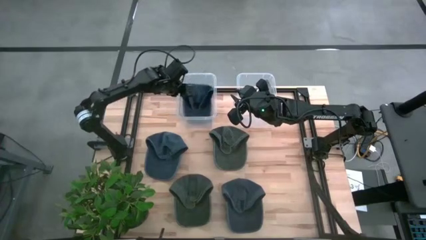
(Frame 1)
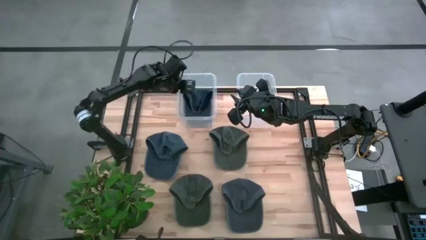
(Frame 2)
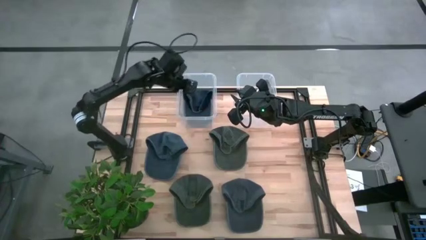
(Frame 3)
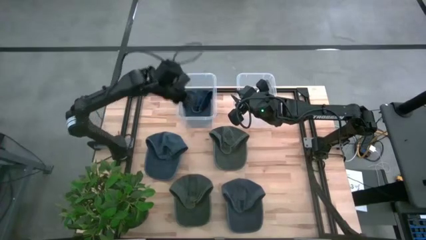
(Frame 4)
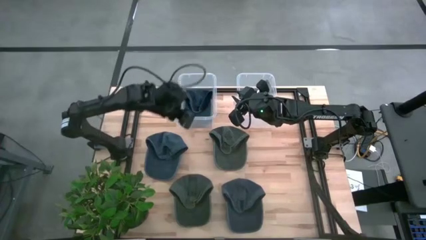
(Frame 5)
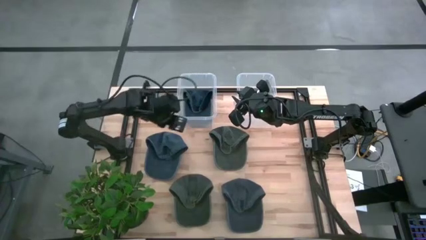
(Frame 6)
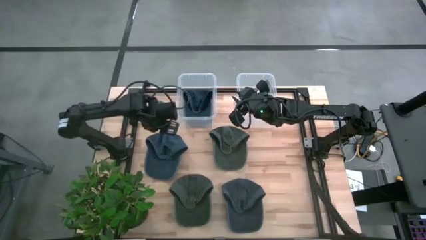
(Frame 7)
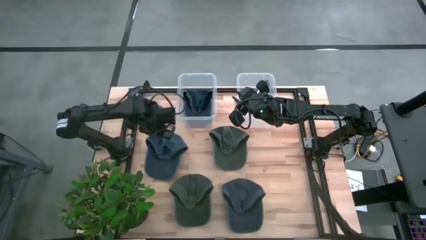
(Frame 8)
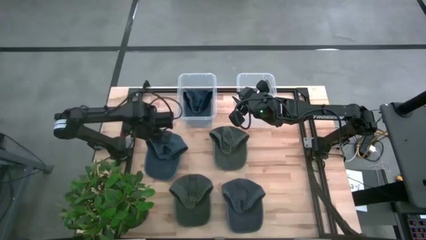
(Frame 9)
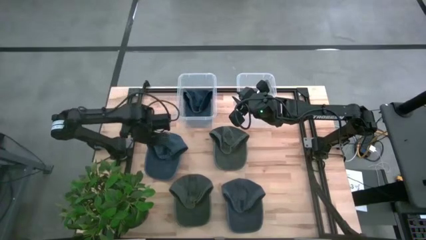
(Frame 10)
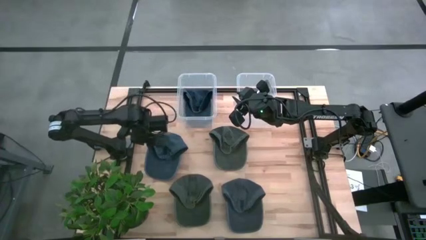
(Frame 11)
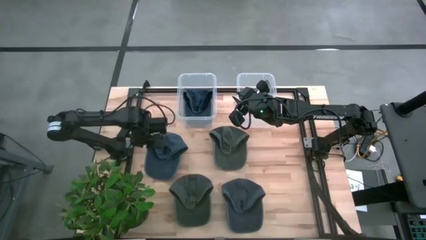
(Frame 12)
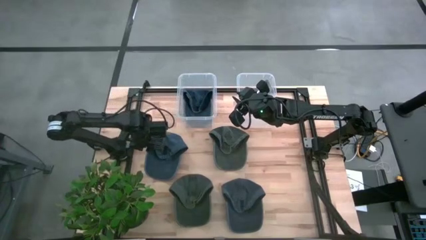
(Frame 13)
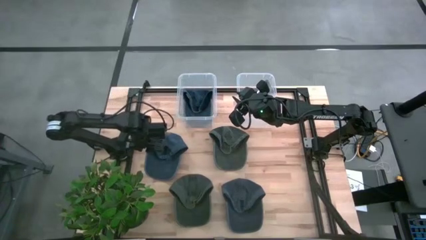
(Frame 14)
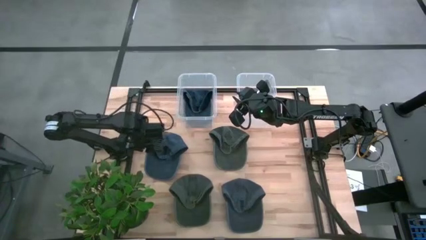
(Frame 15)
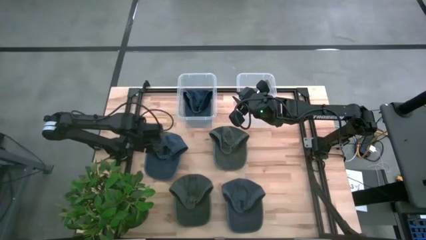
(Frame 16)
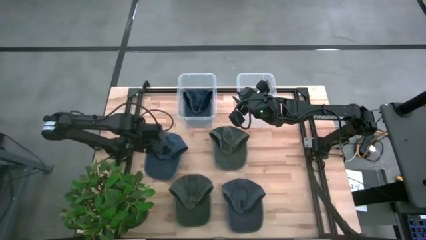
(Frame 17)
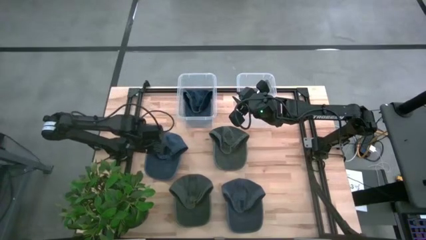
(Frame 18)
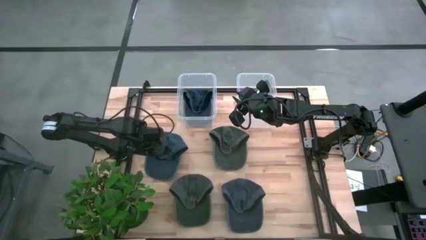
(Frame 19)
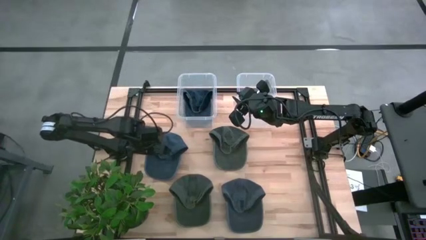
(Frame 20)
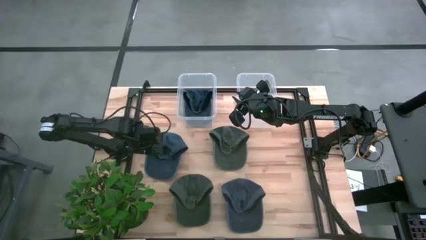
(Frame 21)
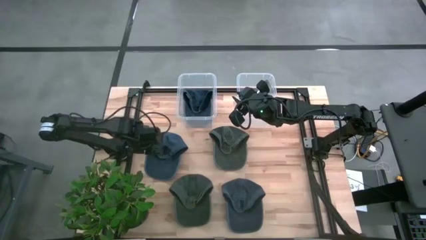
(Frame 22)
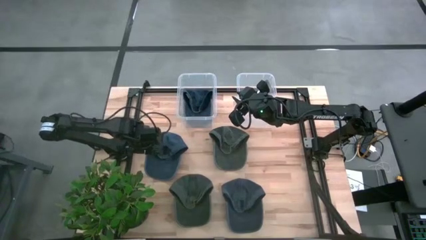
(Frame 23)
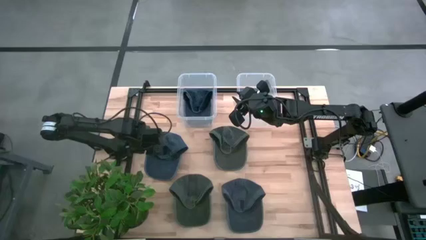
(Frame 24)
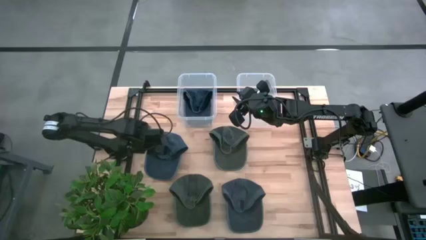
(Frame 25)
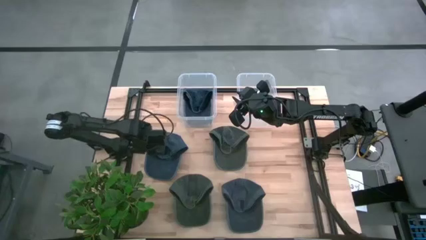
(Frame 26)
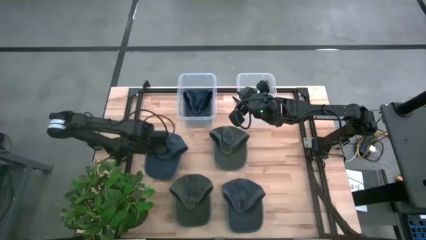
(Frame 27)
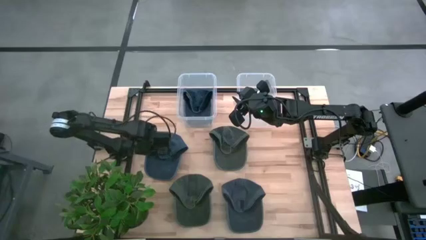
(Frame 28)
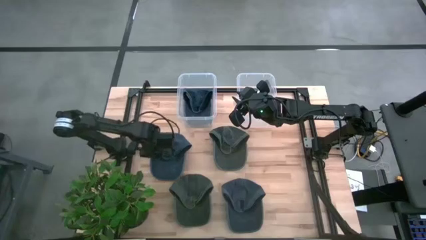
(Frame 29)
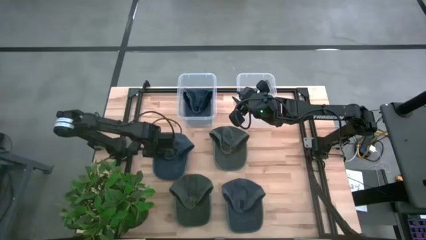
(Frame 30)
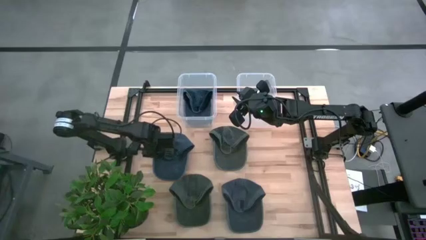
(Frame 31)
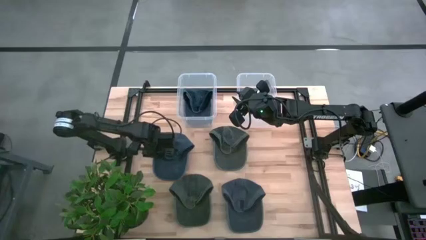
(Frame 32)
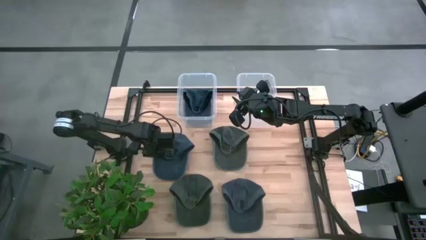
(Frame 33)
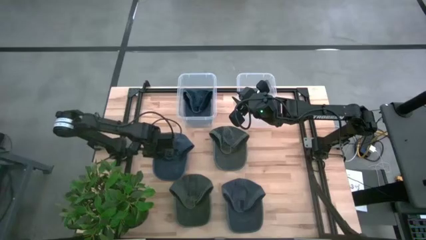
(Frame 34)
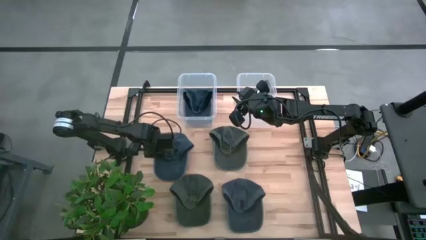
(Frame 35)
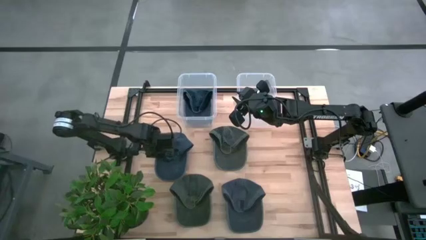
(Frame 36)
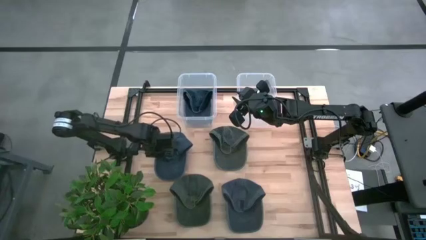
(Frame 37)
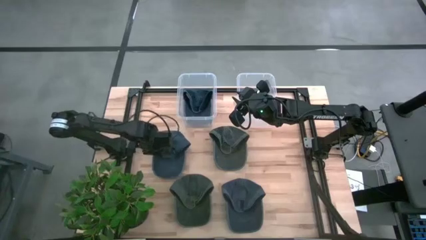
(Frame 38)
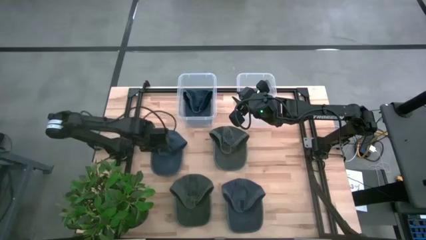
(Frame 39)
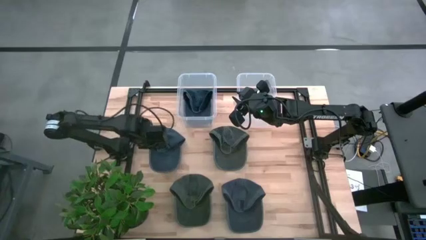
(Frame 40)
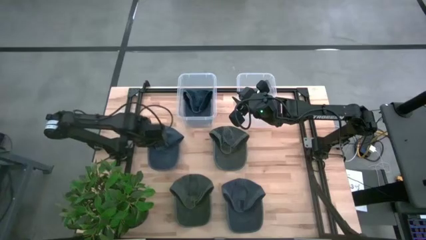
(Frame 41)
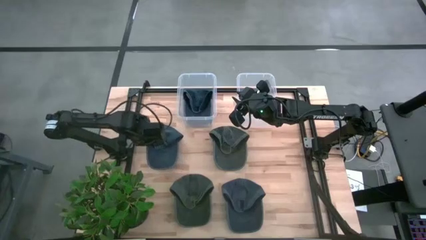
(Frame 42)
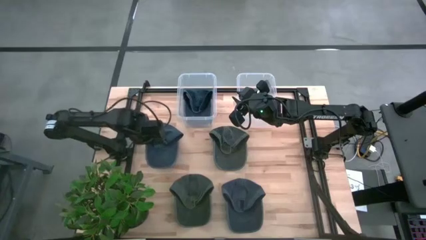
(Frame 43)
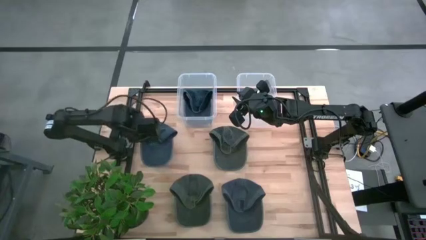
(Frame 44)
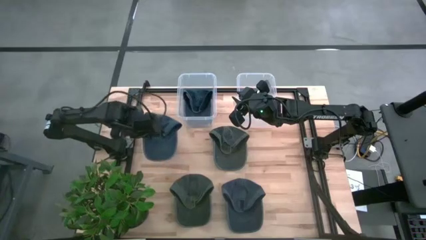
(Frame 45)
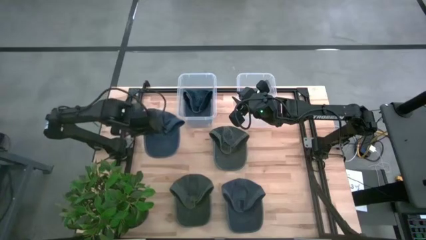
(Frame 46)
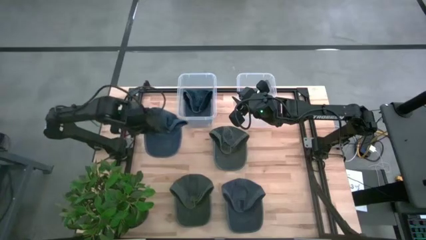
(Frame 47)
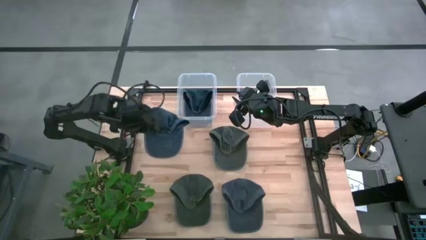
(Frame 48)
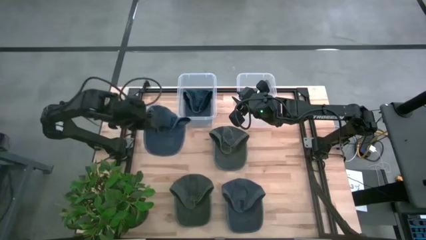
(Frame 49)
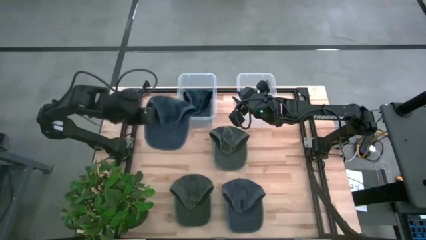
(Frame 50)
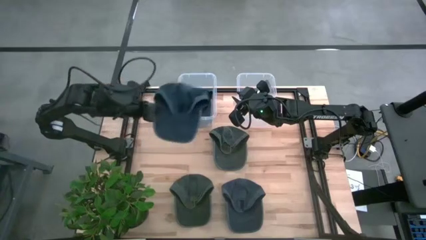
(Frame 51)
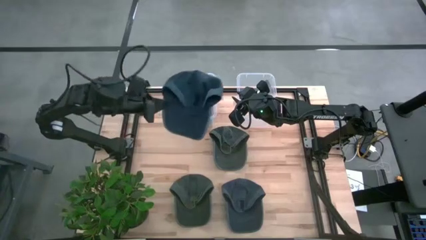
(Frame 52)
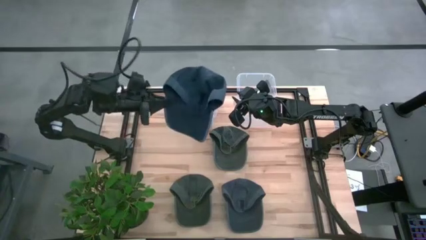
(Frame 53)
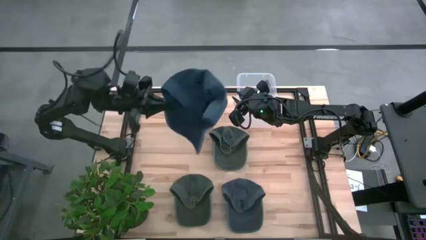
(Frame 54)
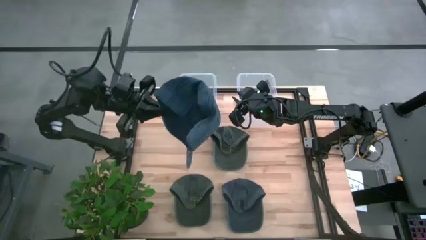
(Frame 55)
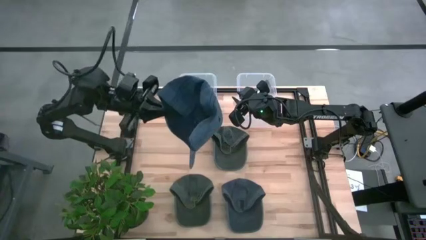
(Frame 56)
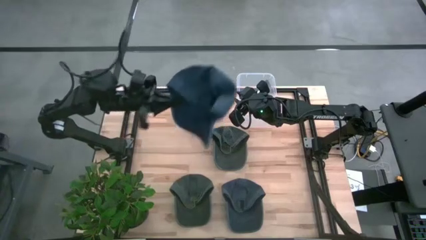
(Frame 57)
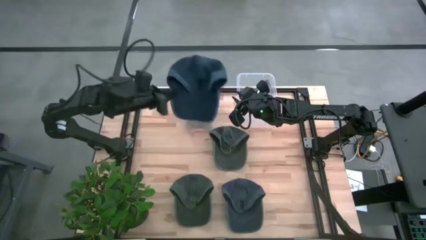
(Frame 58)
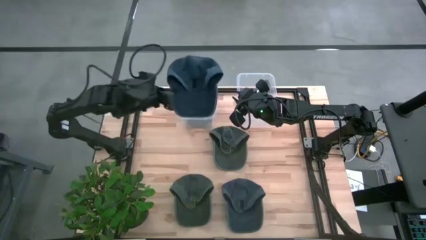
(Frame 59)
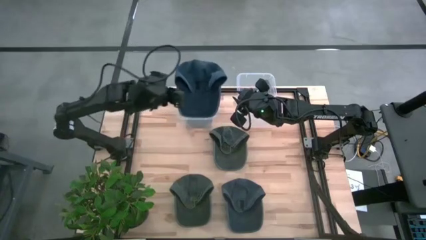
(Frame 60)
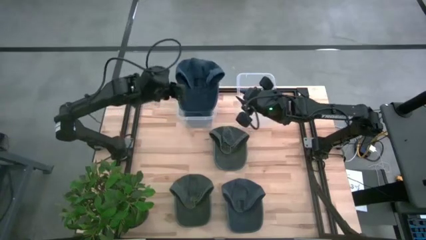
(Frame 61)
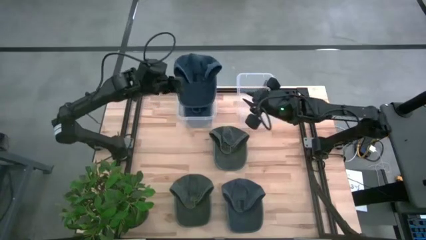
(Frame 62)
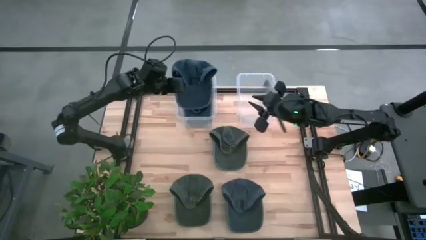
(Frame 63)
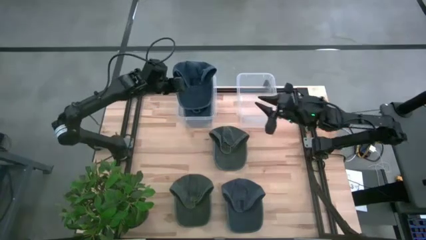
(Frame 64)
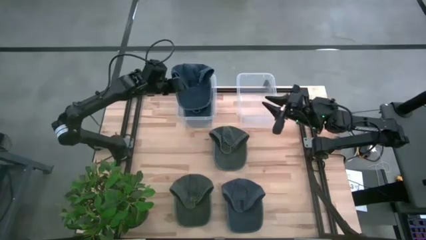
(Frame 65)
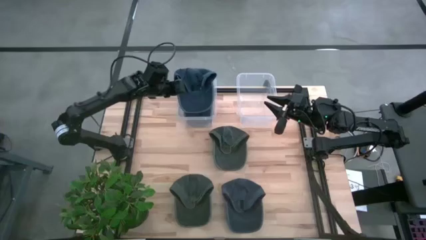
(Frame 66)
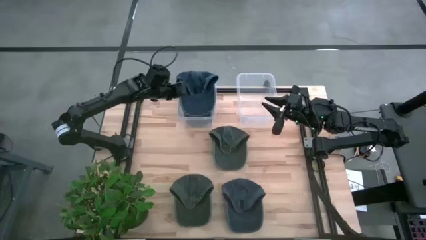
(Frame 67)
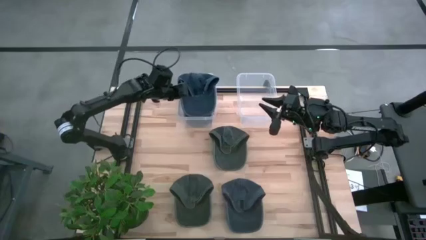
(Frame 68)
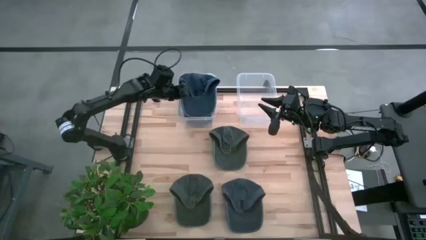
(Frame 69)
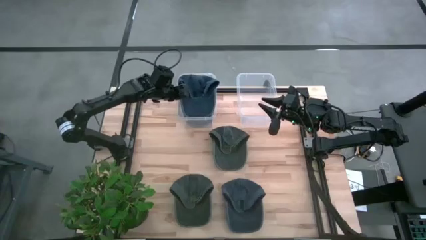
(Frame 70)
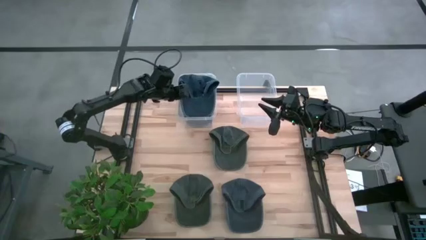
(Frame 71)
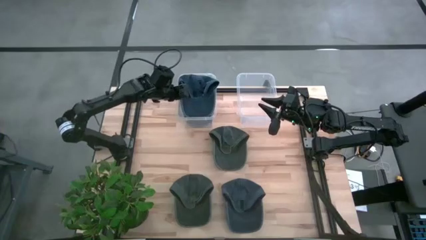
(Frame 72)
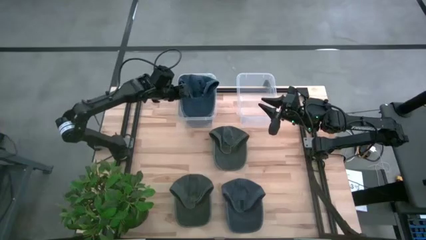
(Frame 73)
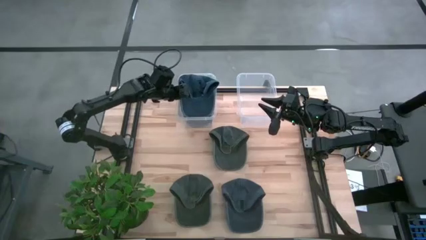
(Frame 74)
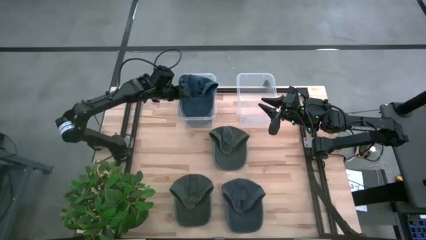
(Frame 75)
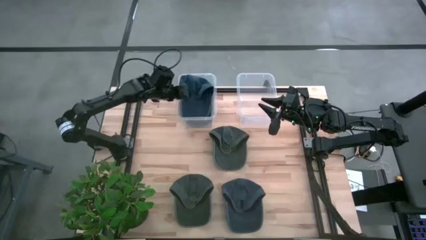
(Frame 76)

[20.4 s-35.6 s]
Task: Pick & Place hat
Put the top blue cap into the left transparent bin
